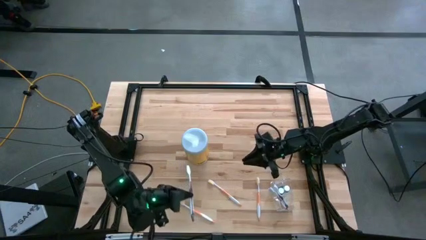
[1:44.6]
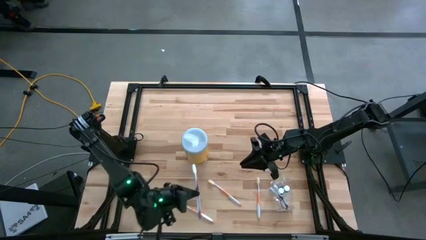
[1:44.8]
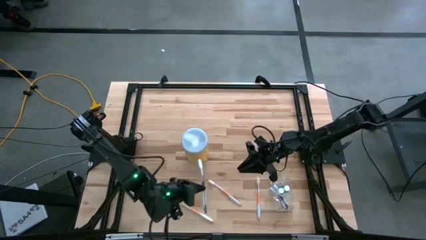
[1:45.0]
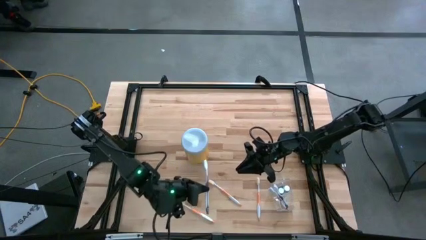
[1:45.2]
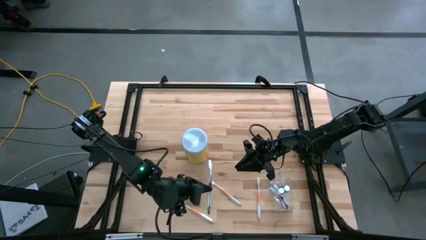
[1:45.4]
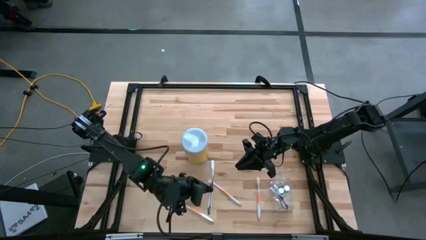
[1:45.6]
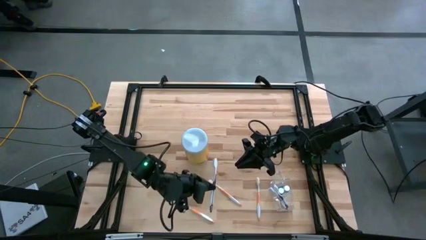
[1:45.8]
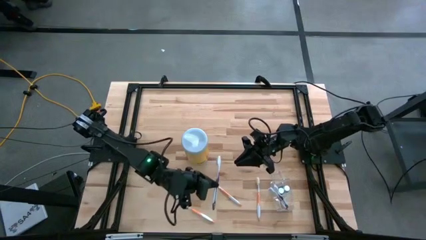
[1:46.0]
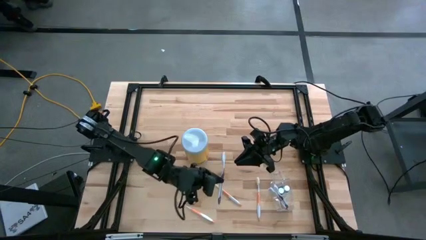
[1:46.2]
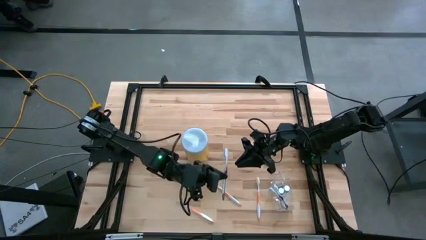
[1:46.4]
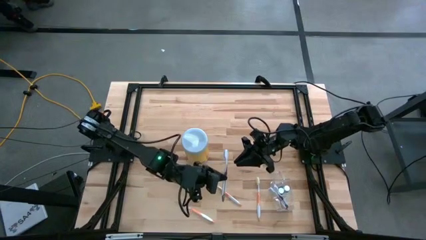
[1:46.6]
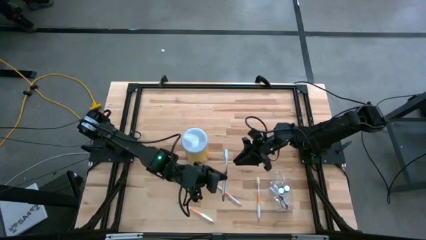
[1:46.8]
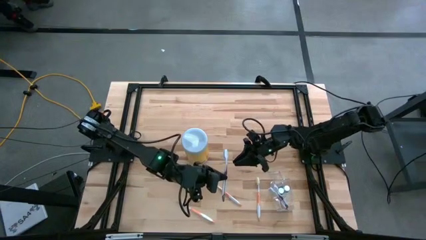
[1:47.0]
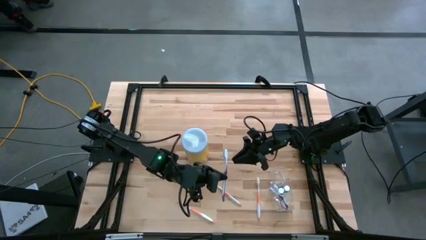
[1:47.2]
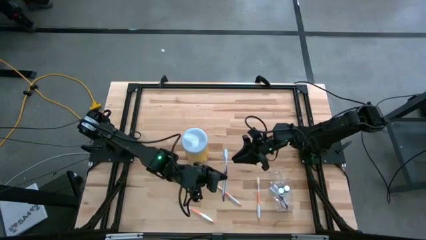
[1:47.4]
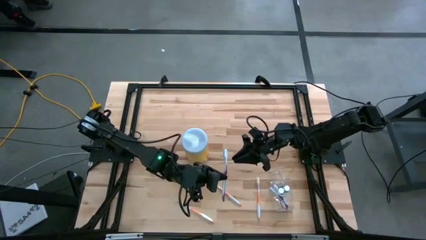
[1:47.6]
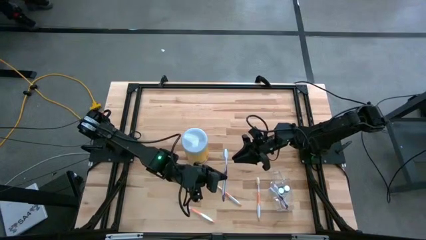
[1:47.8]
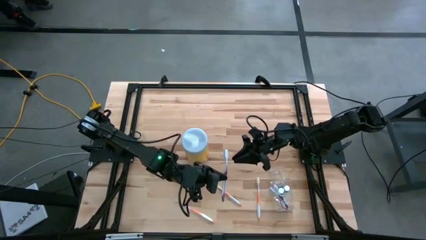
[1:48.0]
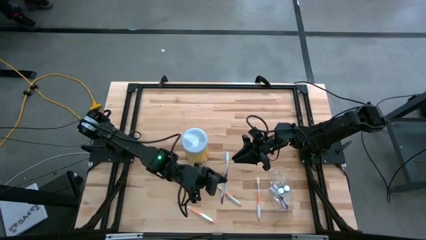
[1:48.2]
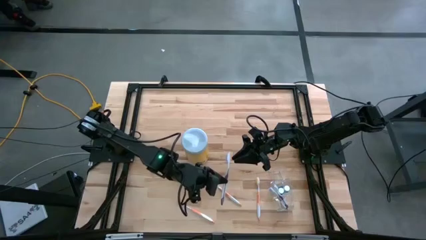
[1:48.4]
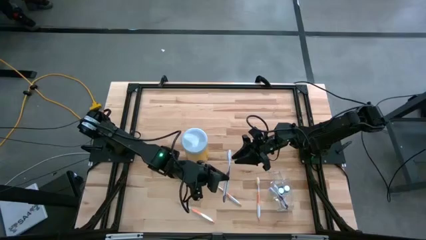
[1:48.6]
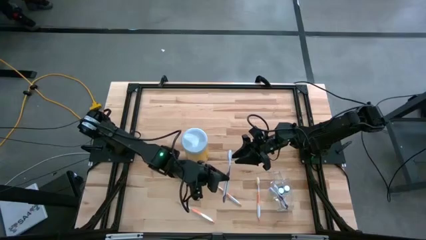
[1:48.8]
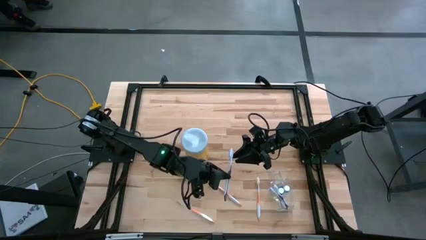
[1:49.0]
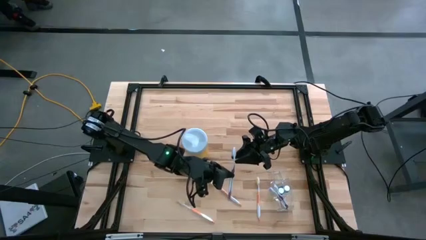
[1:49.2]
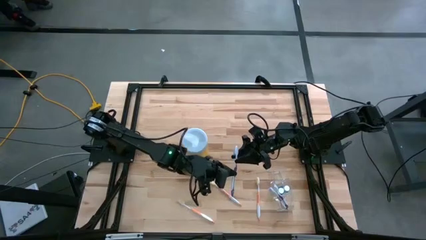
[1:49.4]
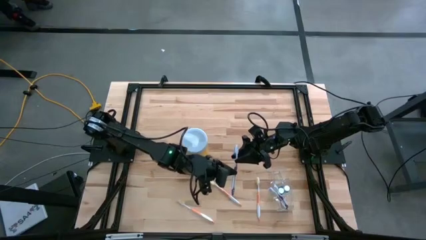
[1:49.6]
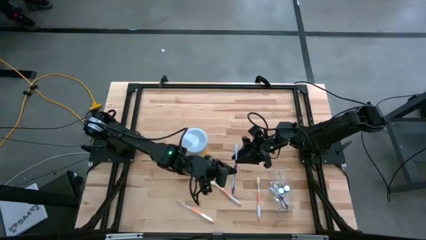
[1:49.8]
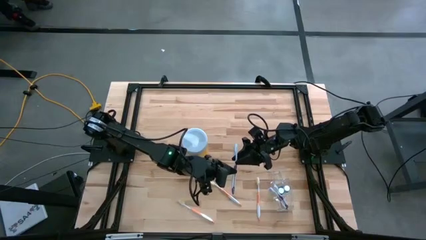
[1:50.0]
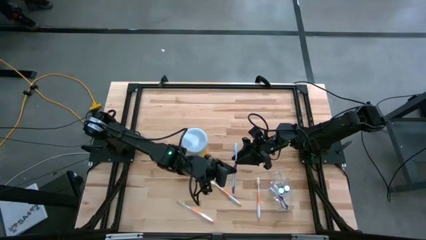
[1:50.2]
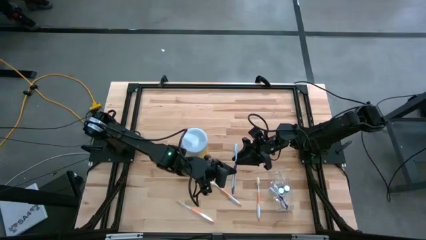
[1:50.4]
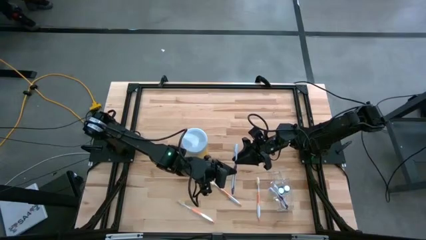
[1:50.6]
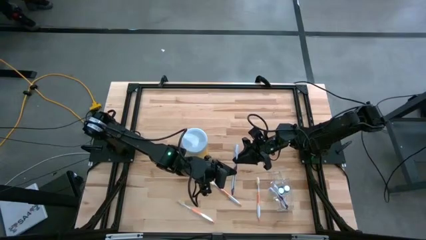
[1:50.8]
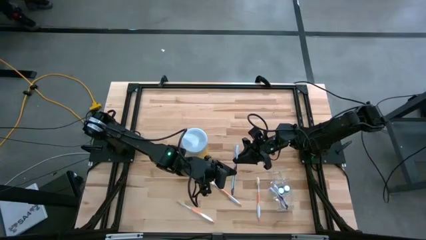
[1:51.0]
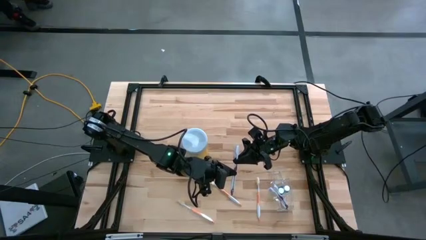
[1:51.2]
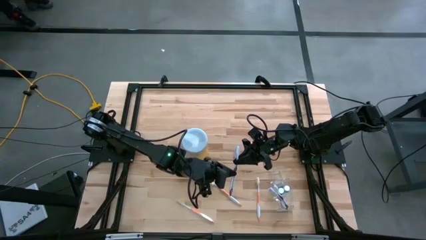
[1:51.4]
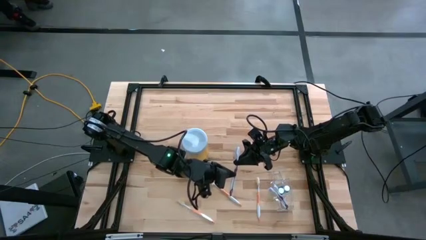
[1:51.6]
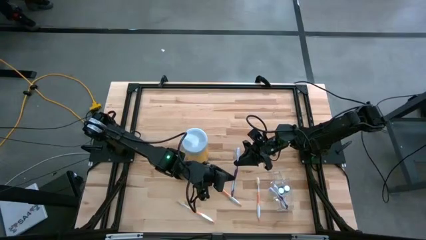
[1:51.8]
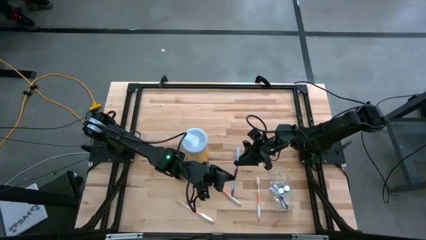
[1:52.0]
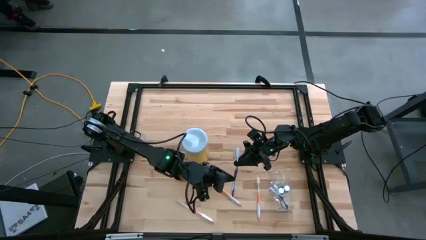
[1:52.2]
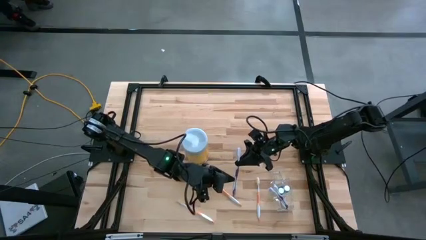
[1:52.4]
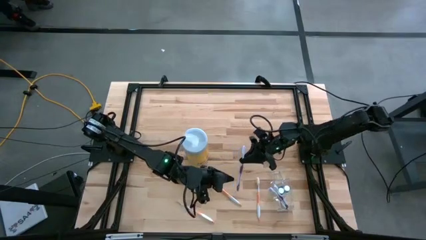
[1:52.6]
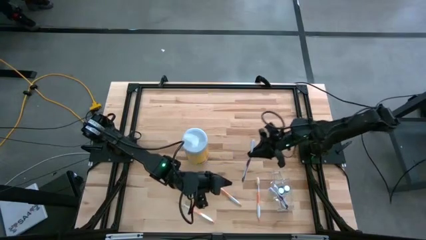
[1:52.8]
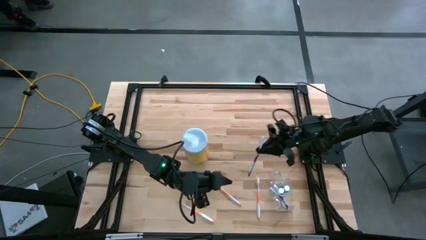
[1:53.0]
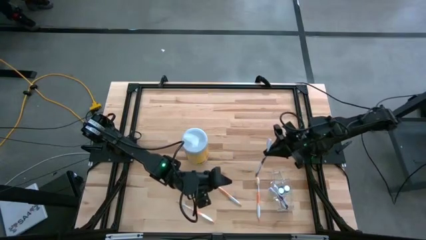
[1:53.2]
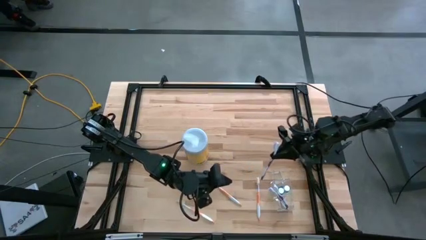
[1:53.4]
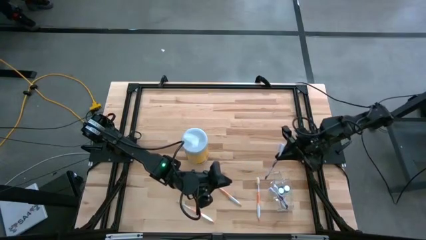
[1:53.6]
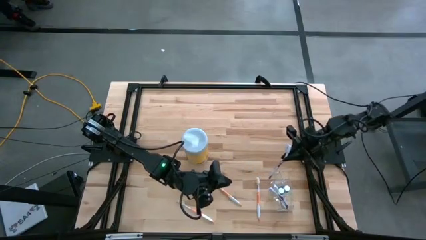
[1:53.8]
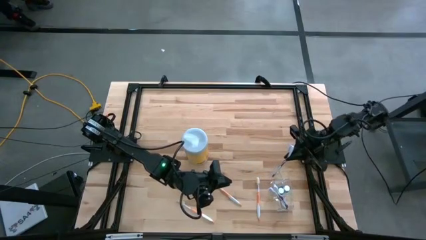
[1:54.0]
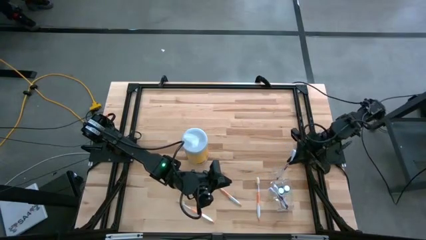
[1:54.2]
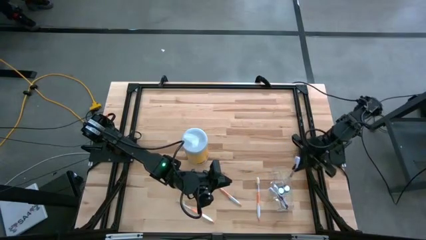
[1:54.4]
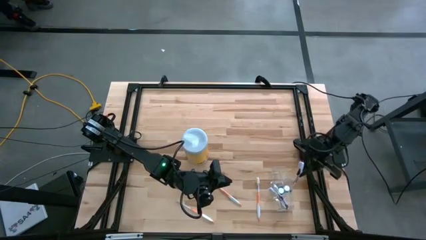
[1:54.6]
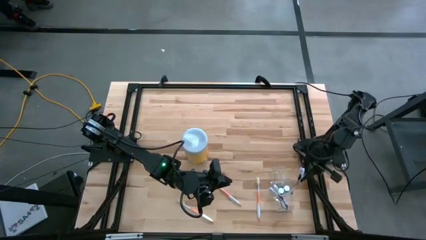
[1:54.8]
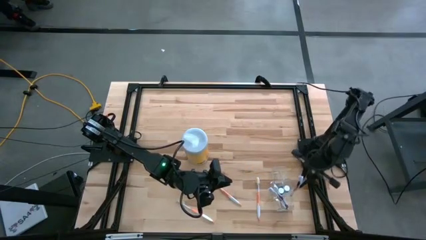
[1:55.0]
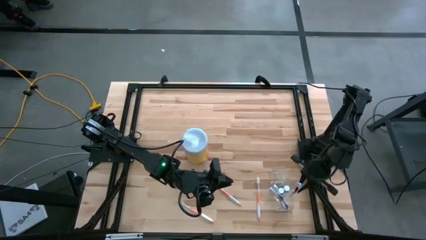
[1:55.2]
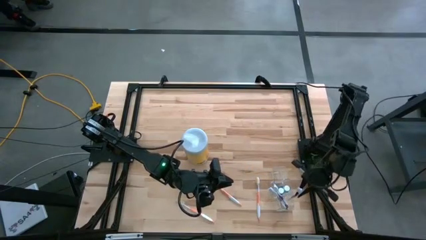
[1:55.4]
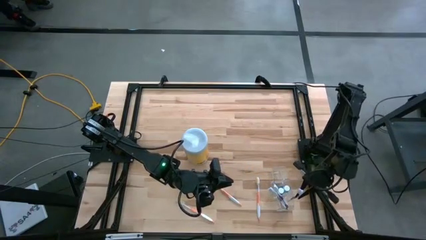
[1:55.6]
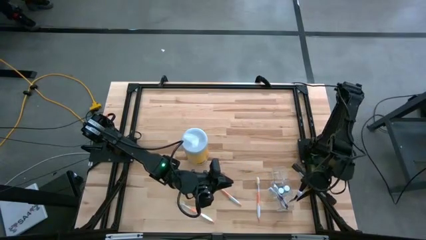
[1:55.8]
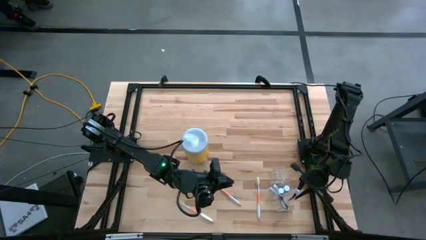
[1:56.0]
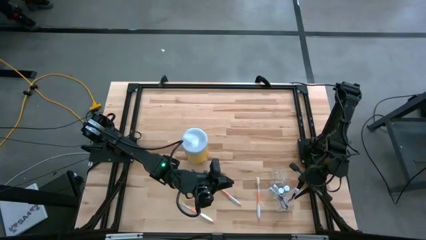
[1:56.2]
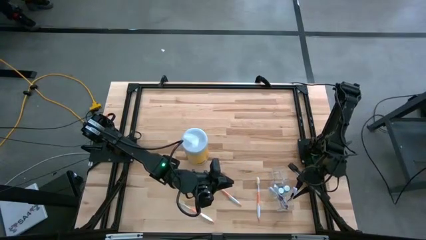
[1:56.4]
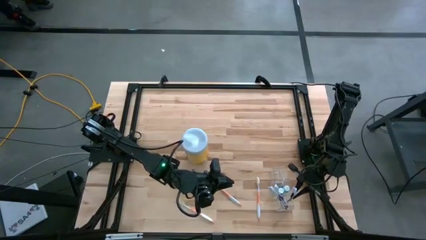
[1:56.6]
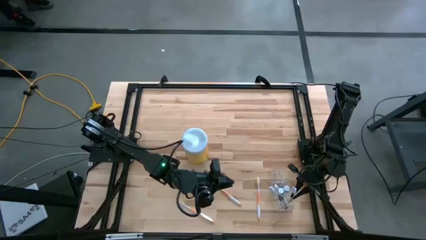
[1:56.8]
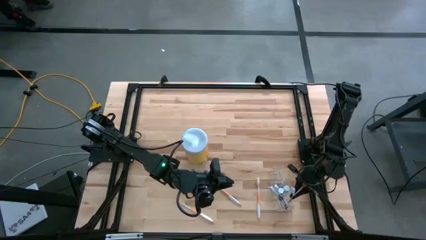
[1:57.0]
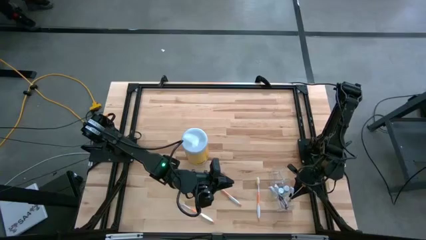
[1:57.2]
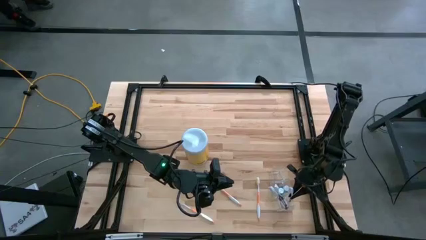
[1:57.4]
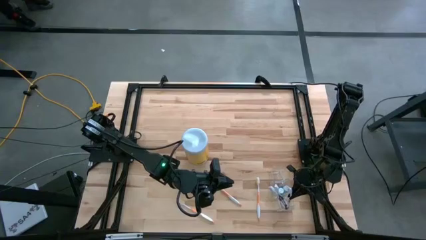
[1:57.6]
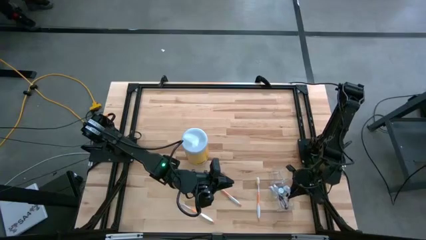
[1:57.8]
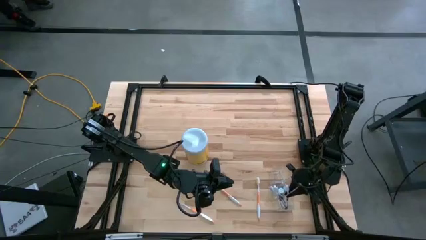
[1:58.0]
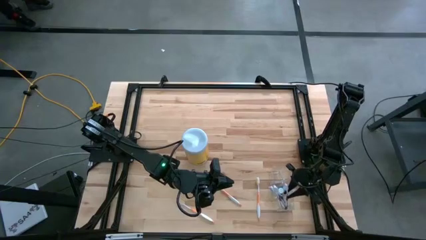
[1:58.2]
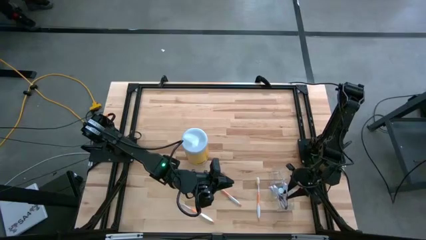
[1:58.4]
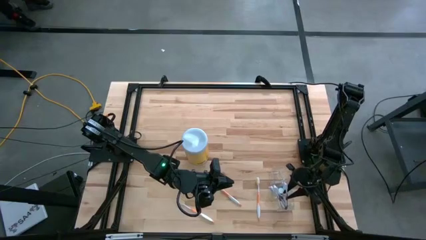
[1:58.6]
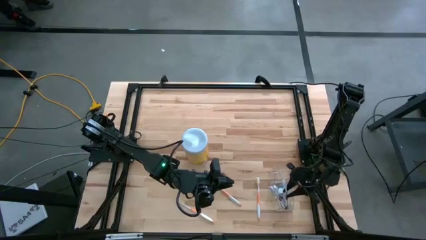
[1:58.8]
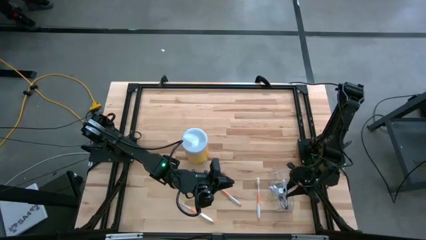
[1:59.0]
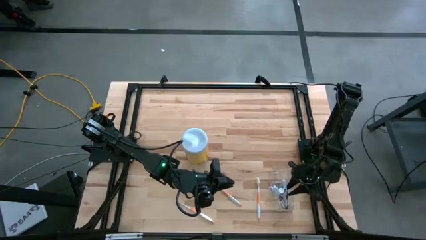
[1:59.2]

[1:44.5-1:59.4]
Task: Pick & Place toothbrushing station
Put the purple toothbrush in the bottom section of the transparent organizer
